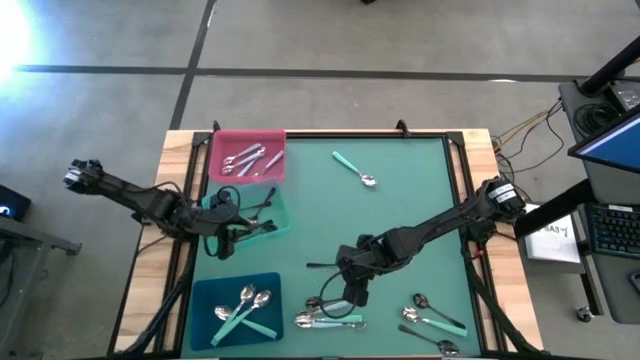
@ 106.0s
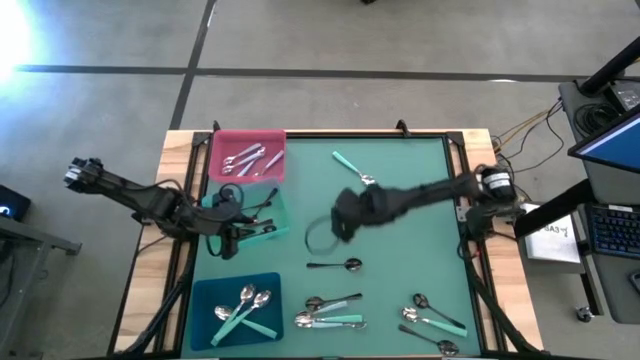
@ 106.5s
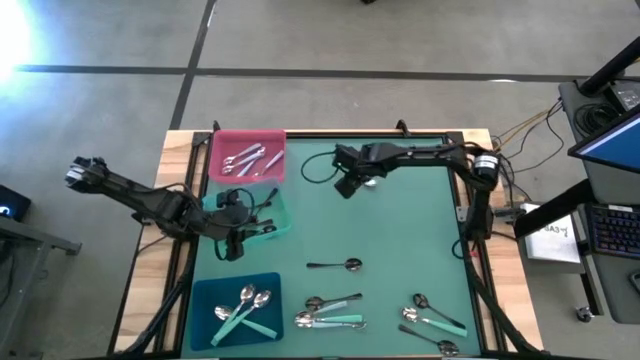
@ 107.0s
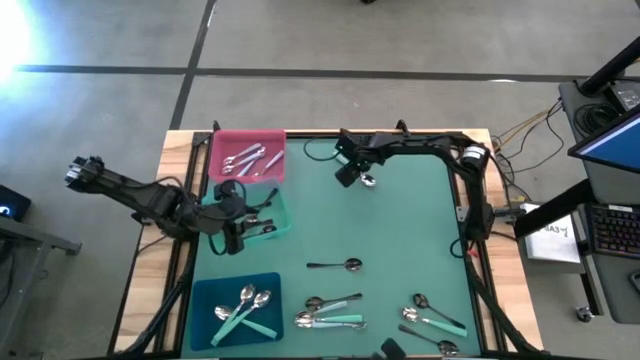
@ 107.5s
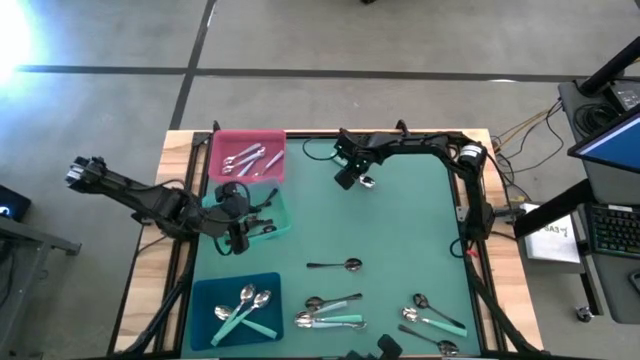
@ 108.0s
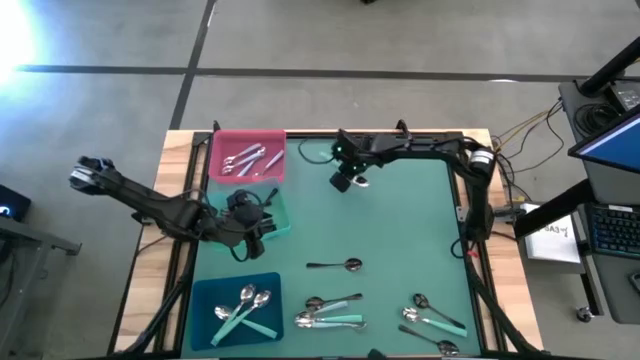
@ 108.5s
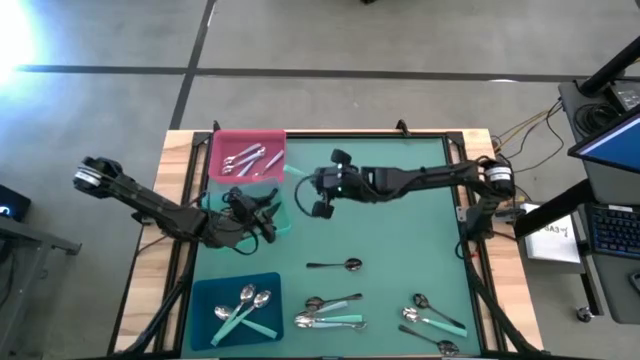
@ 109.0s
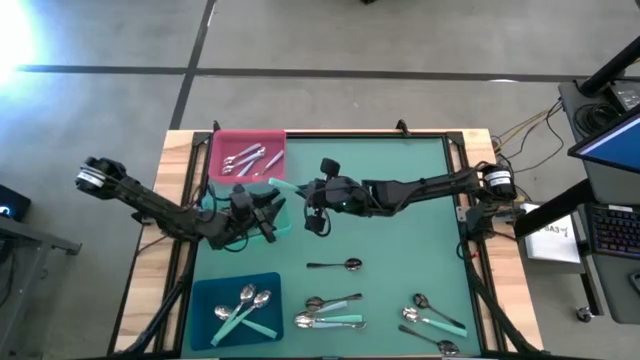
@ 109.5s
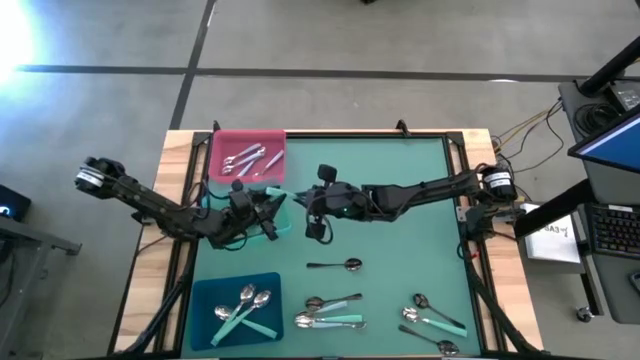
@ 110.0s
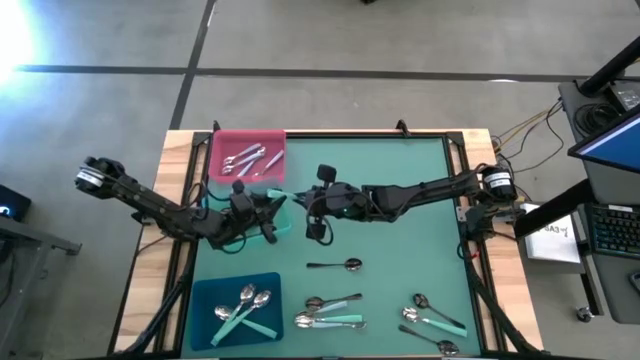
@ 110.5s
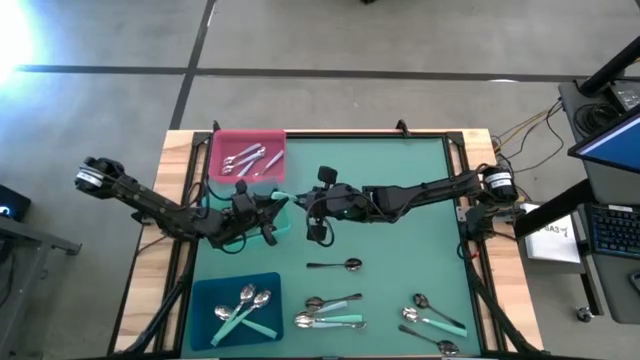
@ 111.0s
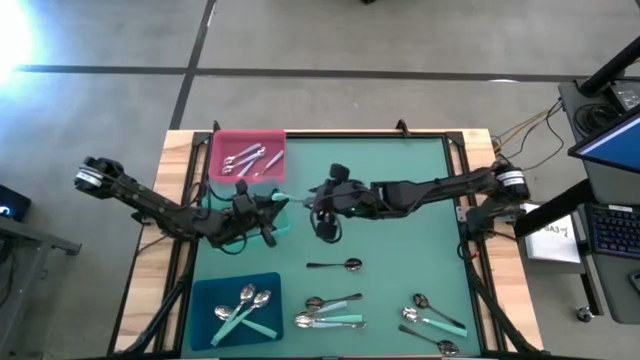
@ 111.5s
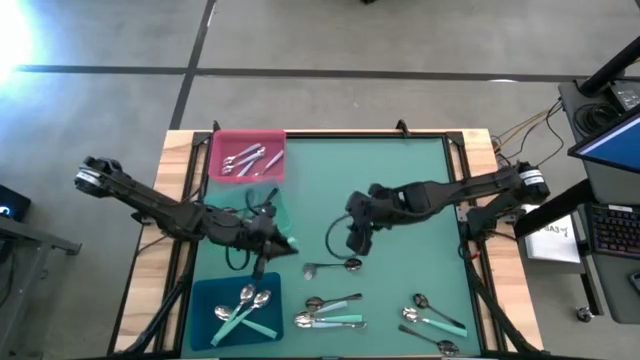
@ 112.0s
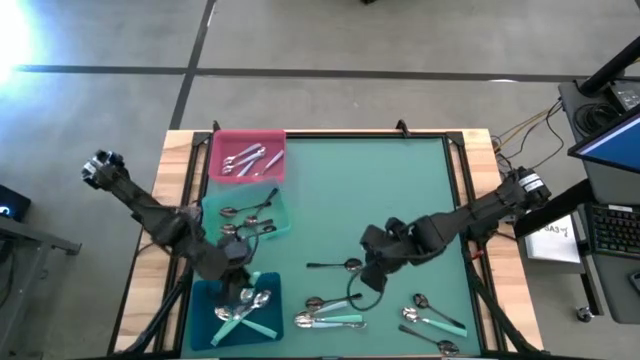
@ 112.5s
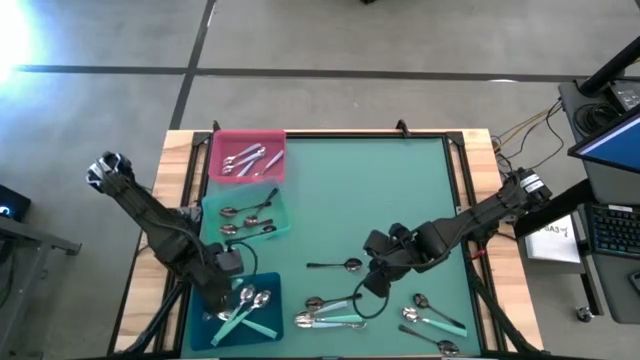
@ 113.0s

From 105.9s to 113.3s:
Task: Sort silverware by color (type)
Put the light blue spoon into the blue bin

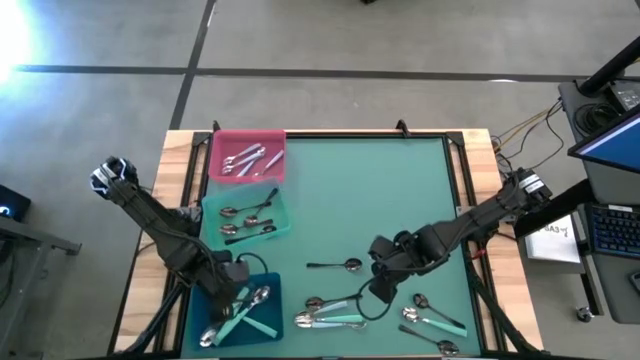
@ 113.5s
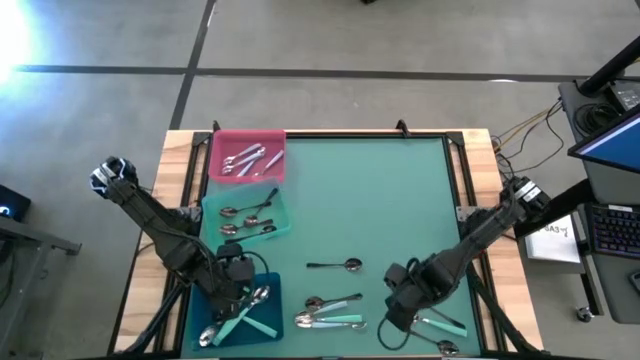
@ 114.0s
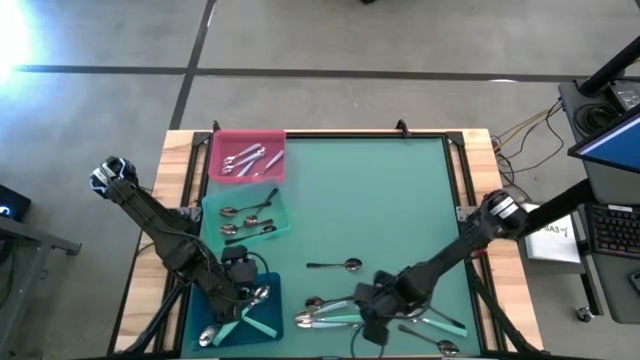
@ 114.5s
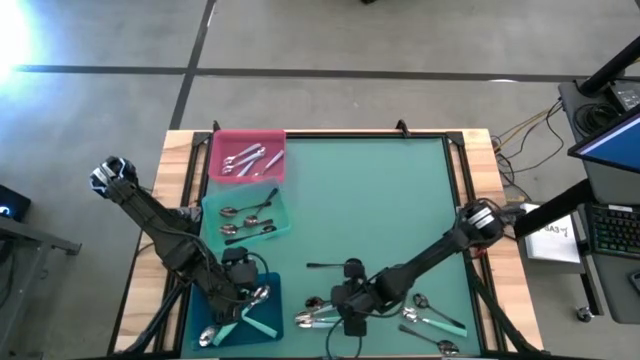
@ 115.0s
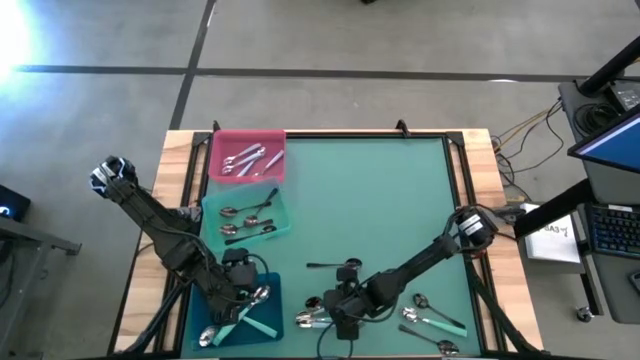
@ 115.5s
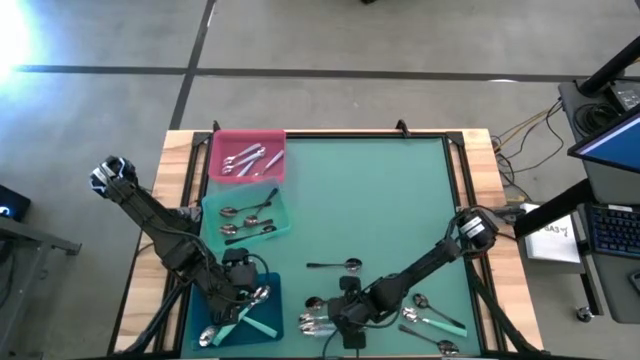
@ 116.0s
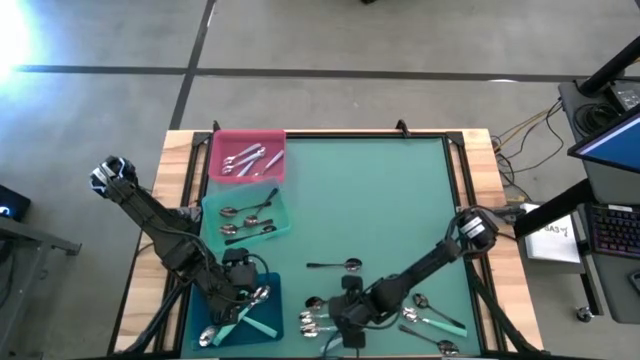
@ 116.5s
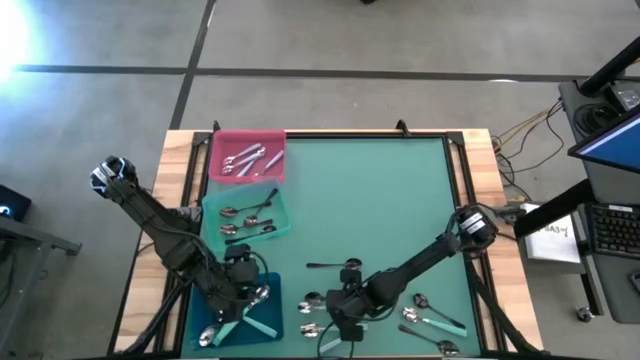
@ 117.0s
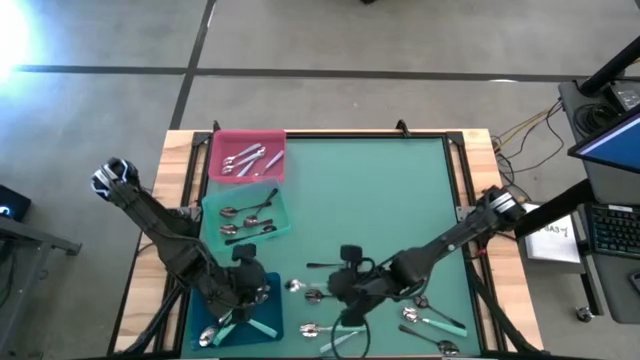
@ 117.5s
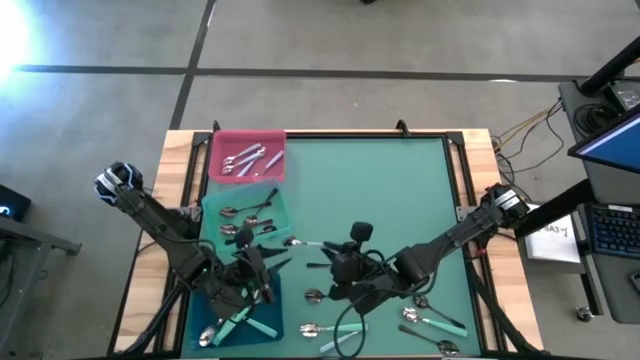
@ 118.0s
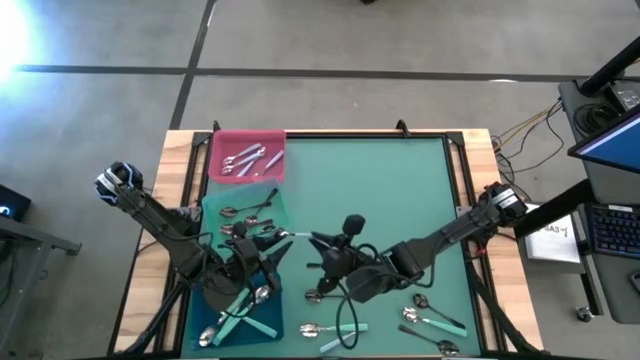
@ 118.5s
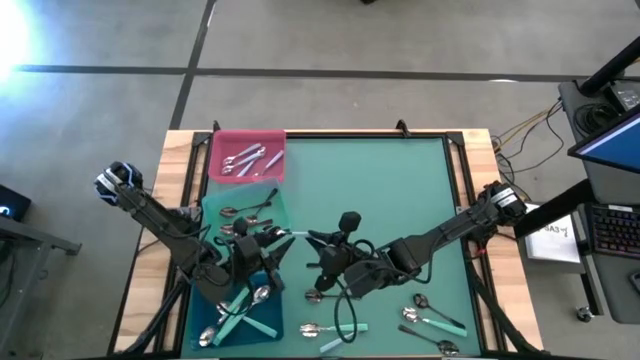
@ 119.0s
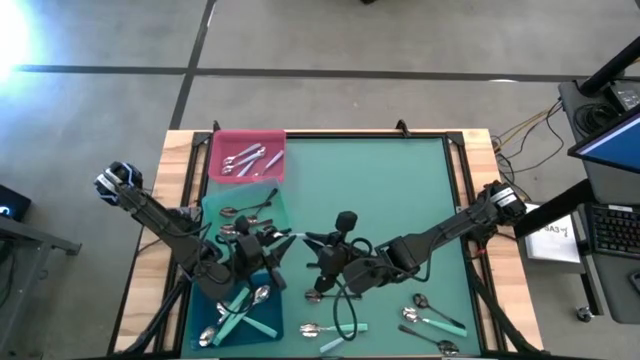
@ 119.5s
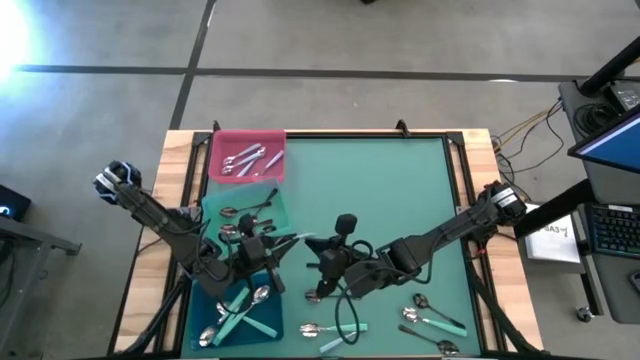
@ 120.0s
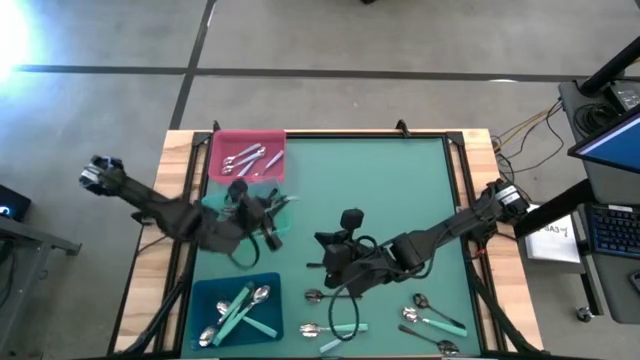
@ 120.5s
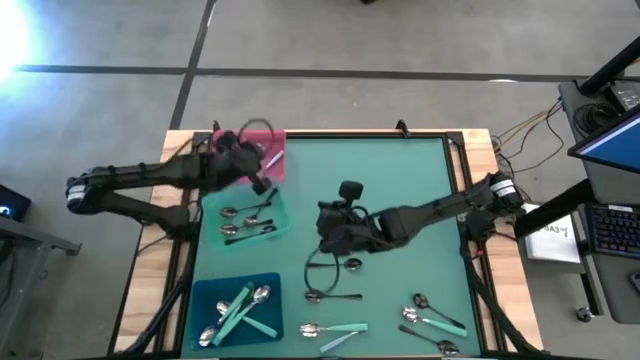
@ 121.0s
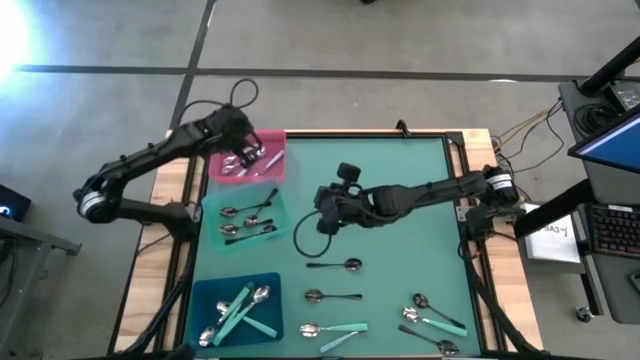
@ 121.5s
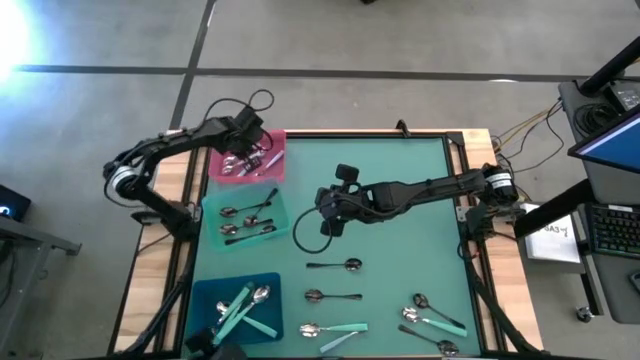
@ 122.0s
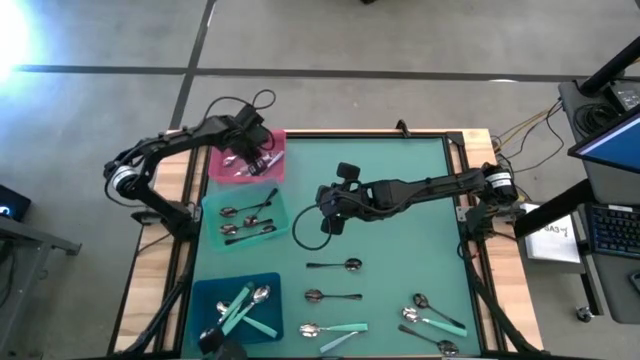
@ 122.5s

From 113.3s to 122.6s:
Put the blue spoon into the pink bin

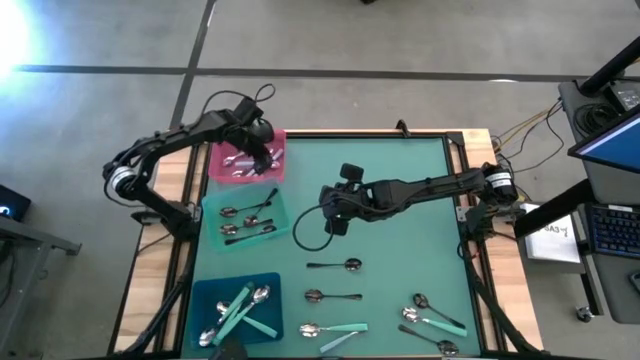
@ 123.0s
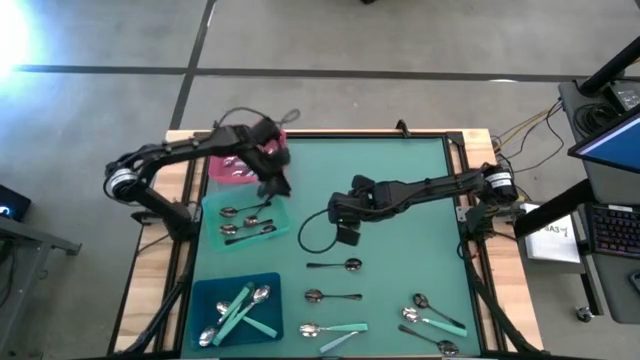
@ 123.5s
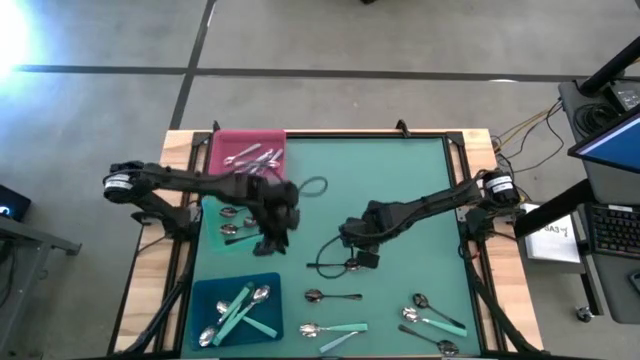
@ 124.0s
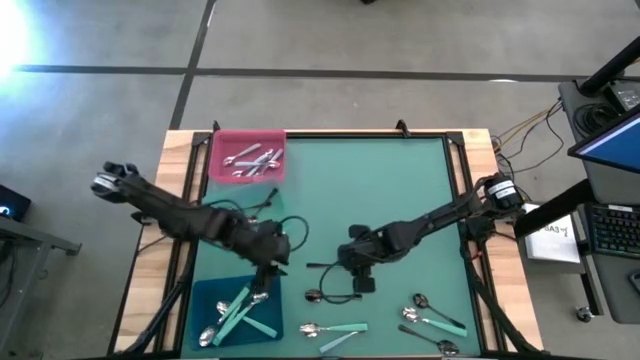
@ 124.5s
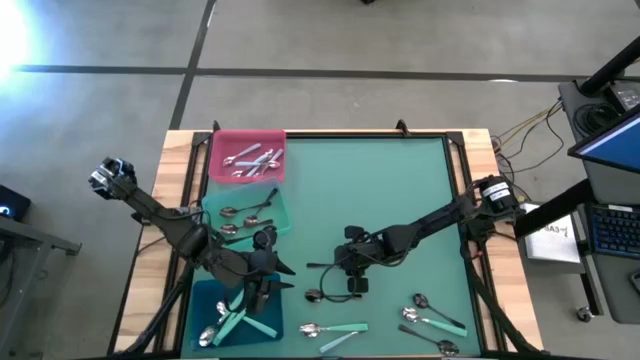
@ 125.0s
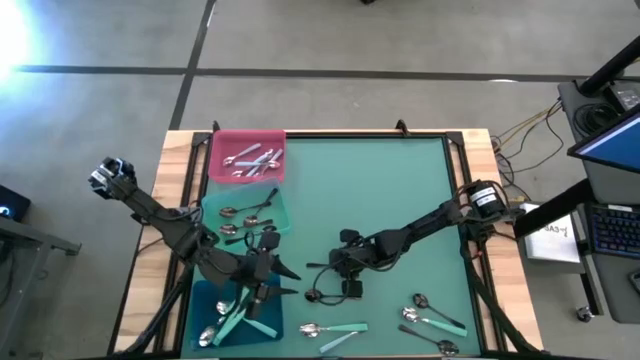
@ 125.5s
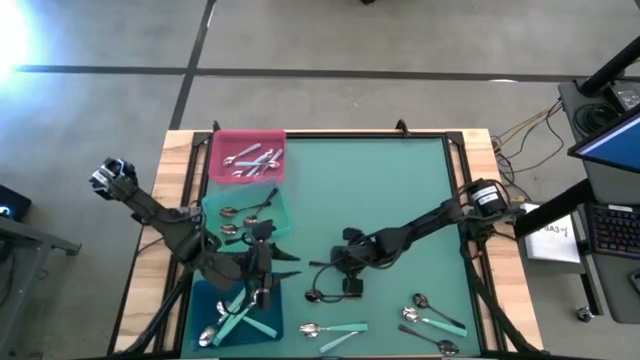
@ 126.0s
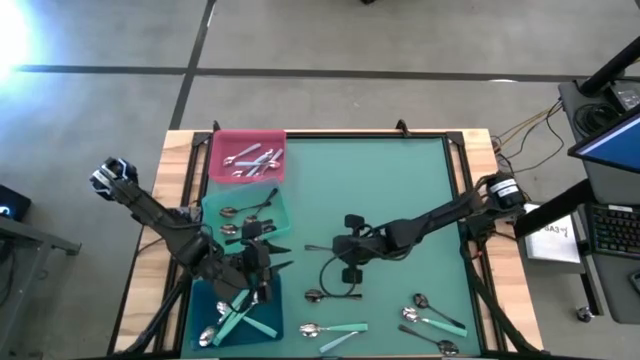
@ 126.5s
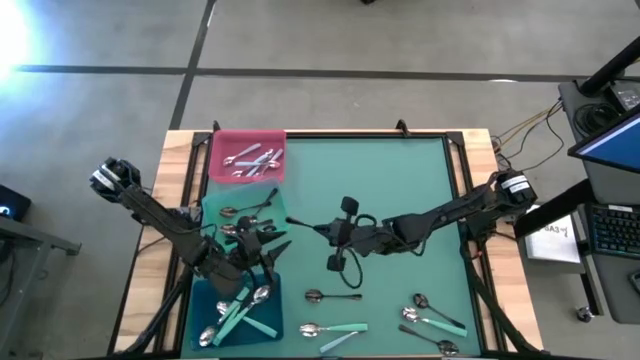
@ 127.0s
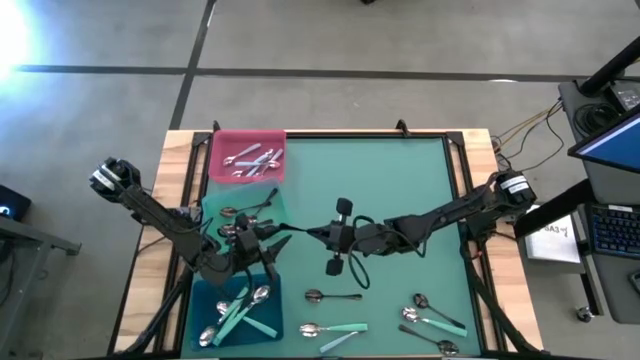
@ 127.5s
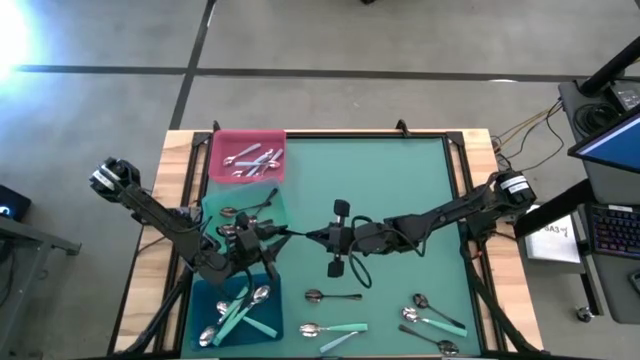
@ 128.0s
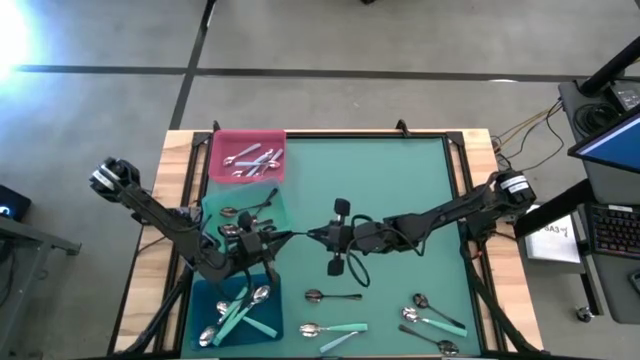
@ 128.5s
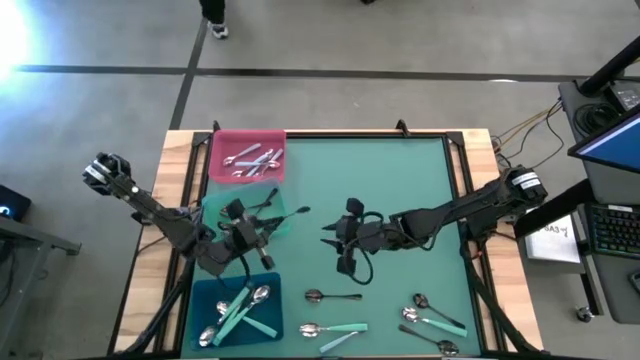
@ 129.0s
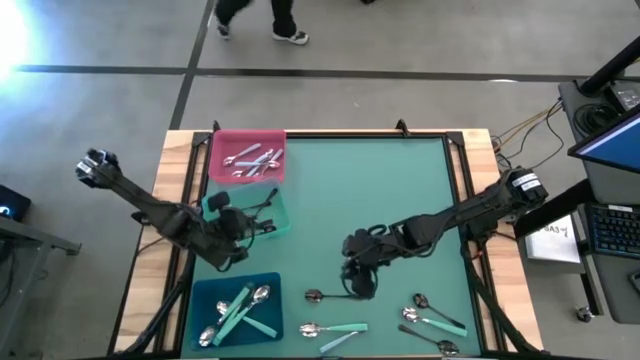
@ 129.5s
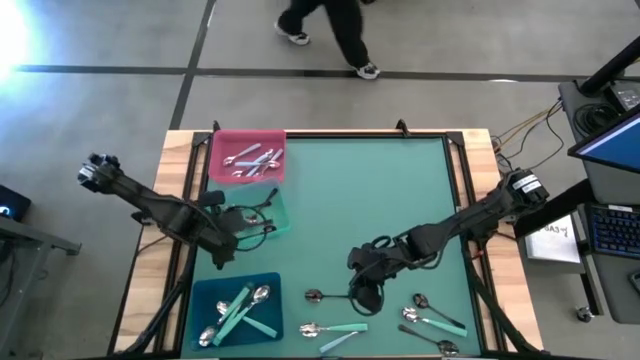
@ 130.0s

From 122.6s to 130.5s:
Put the black spoon into the green bin
